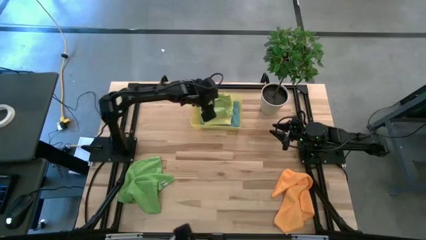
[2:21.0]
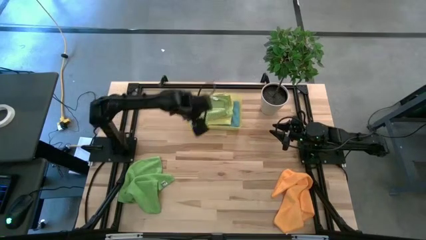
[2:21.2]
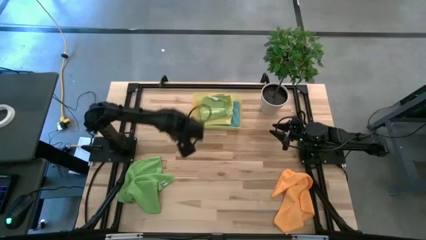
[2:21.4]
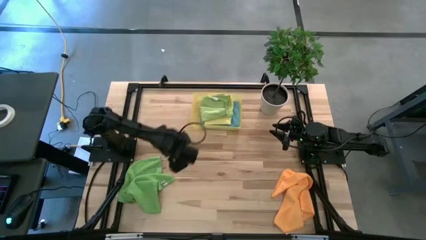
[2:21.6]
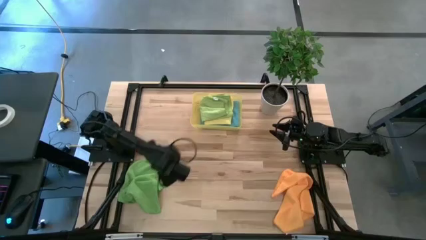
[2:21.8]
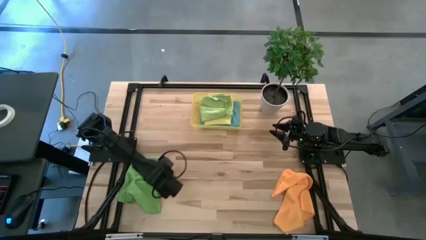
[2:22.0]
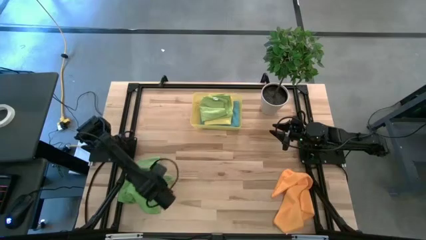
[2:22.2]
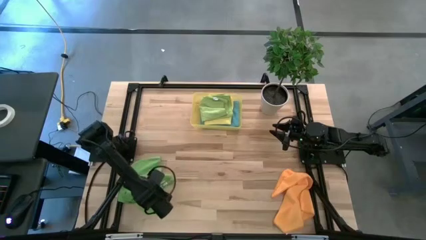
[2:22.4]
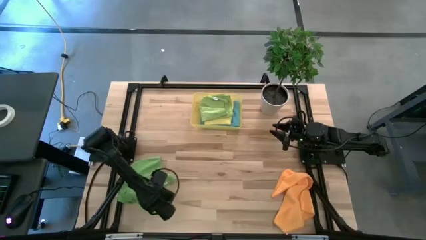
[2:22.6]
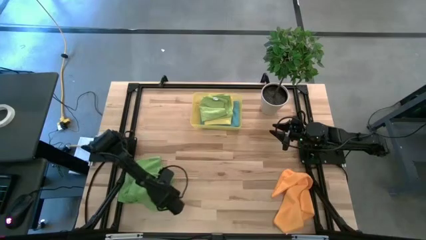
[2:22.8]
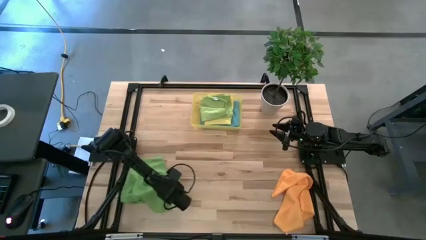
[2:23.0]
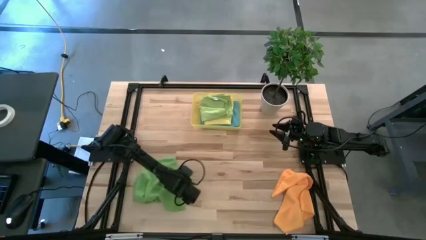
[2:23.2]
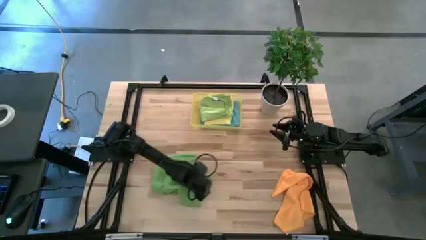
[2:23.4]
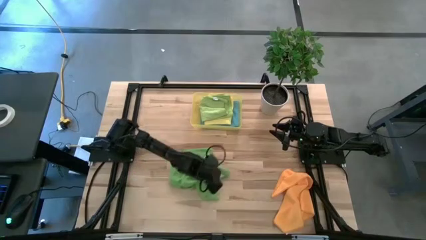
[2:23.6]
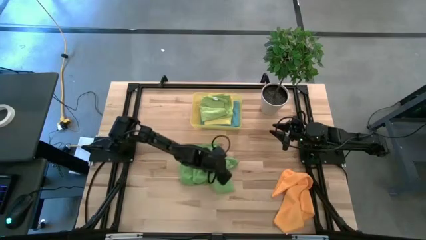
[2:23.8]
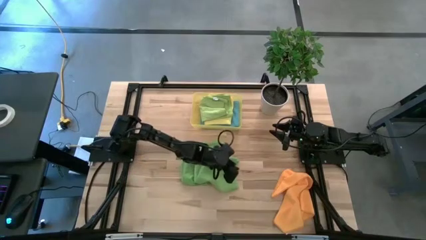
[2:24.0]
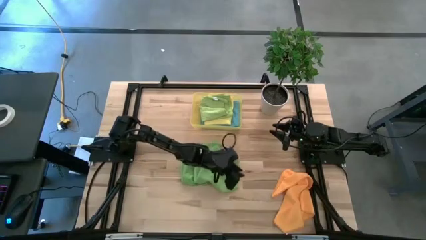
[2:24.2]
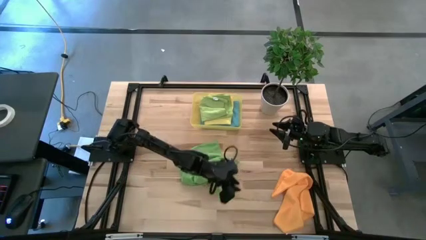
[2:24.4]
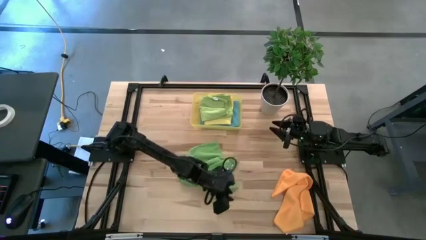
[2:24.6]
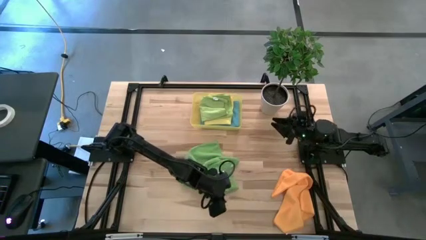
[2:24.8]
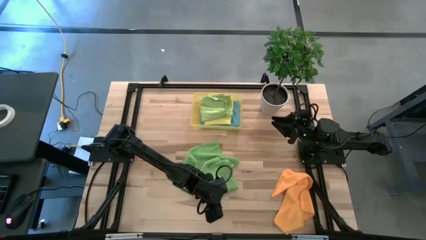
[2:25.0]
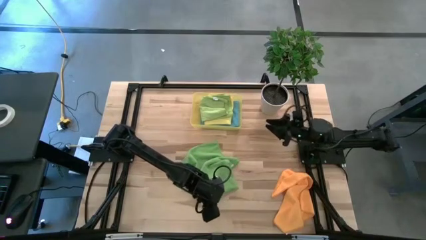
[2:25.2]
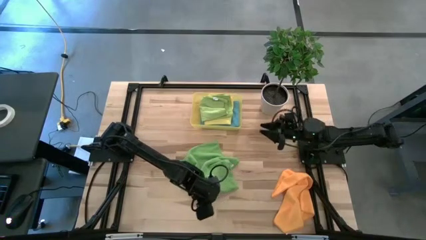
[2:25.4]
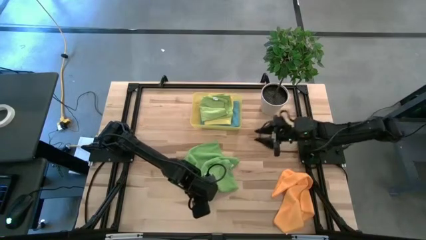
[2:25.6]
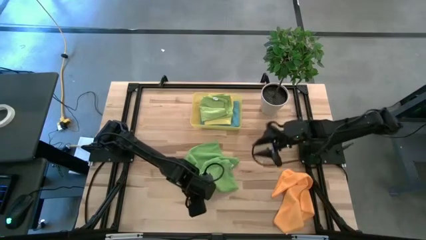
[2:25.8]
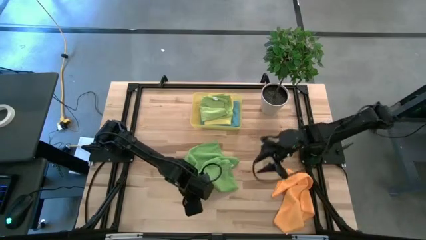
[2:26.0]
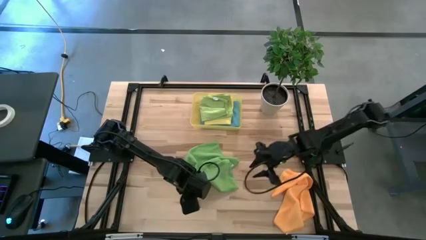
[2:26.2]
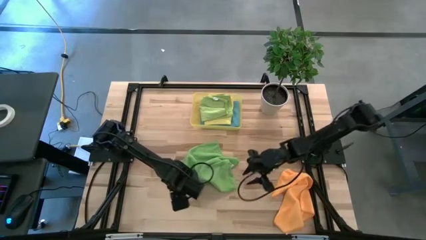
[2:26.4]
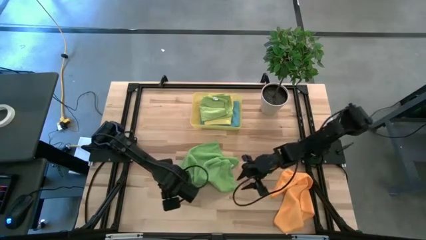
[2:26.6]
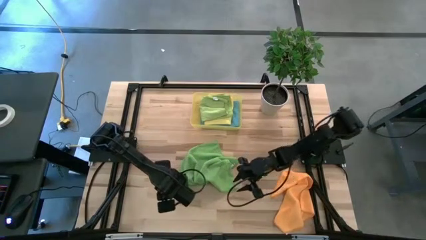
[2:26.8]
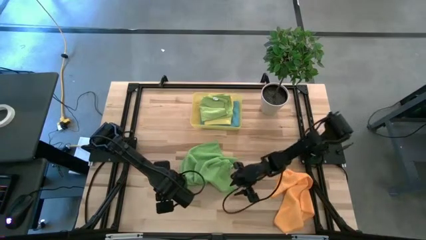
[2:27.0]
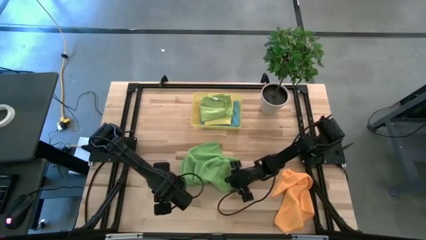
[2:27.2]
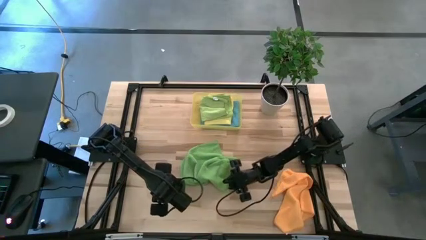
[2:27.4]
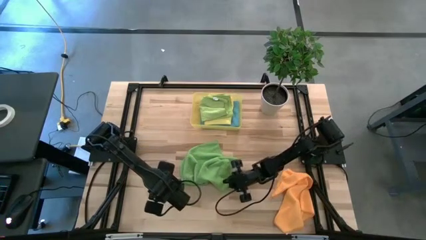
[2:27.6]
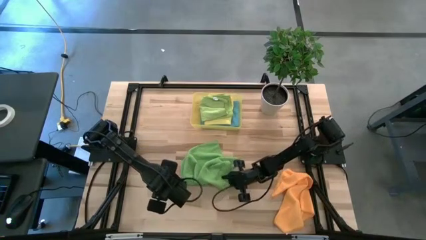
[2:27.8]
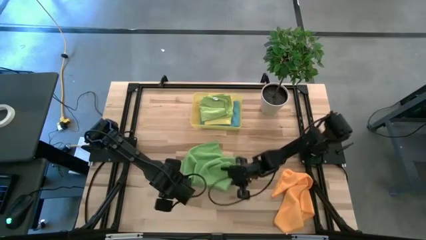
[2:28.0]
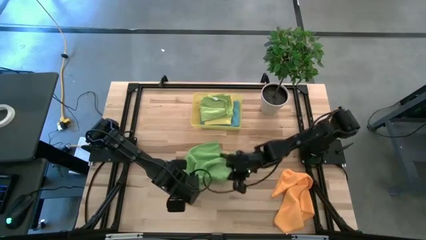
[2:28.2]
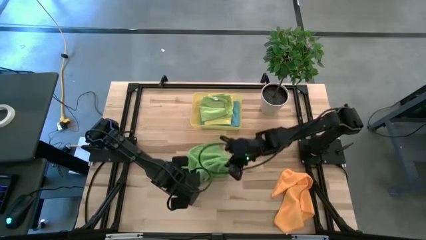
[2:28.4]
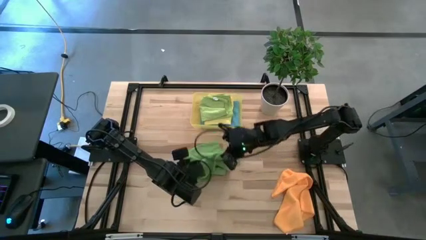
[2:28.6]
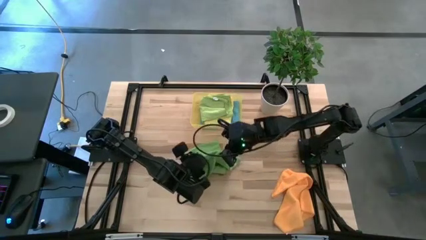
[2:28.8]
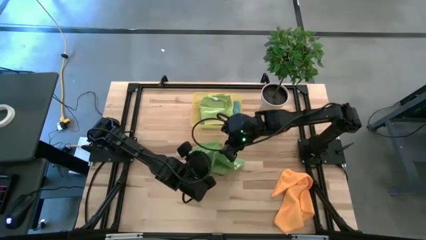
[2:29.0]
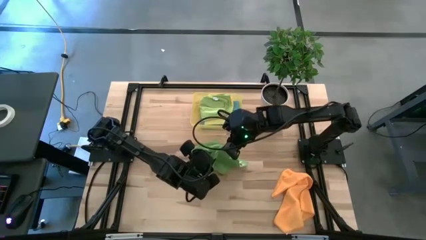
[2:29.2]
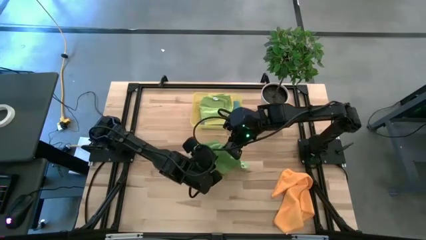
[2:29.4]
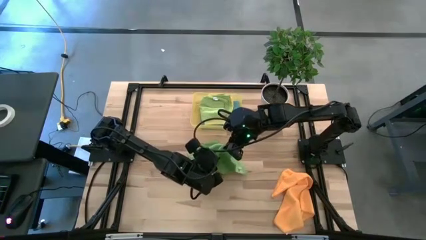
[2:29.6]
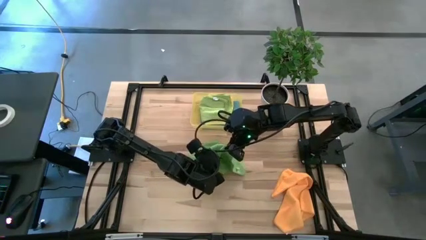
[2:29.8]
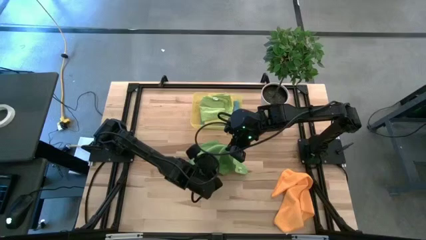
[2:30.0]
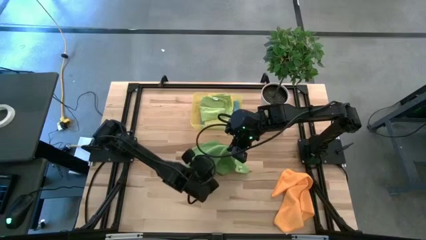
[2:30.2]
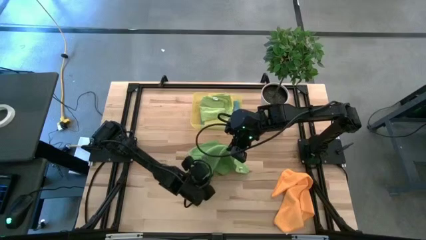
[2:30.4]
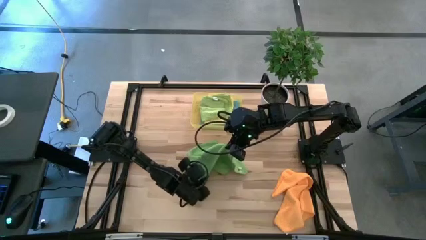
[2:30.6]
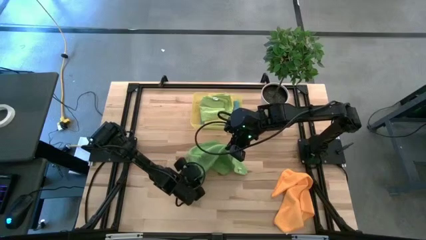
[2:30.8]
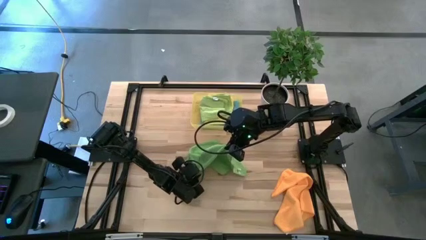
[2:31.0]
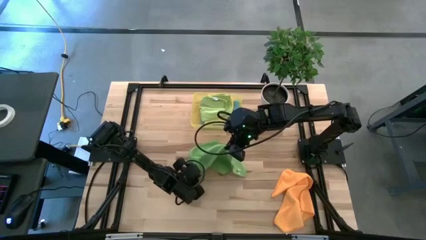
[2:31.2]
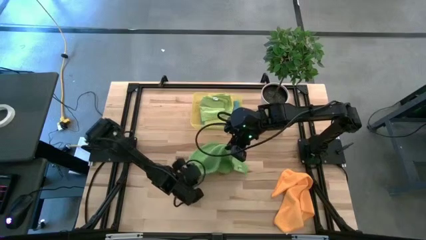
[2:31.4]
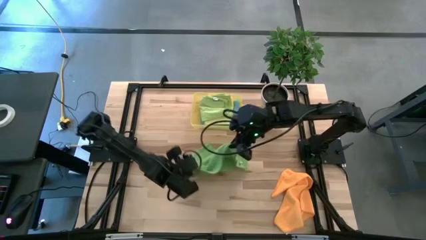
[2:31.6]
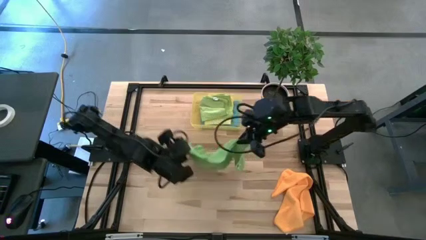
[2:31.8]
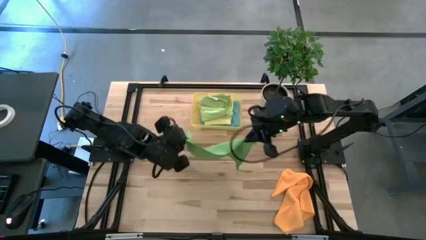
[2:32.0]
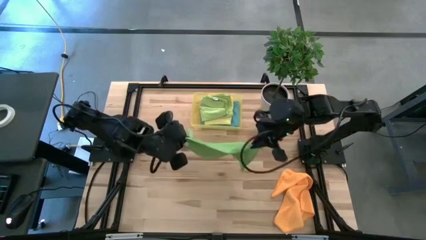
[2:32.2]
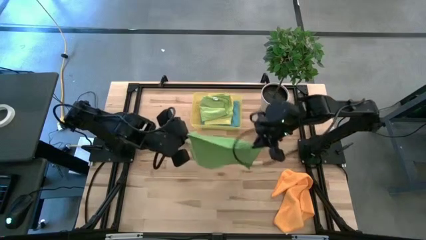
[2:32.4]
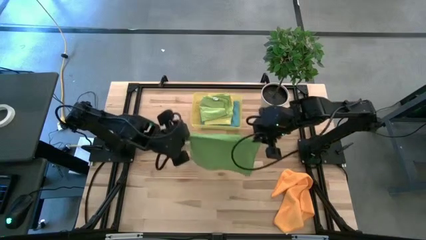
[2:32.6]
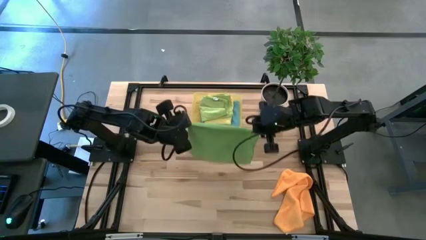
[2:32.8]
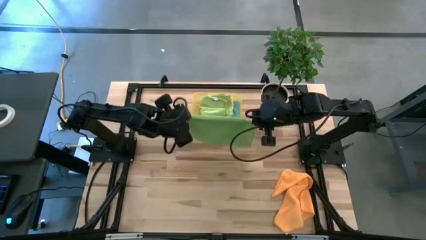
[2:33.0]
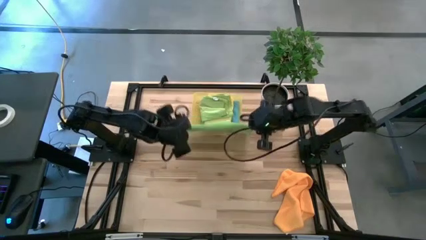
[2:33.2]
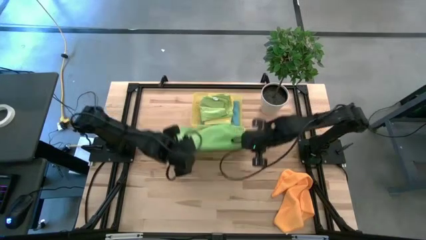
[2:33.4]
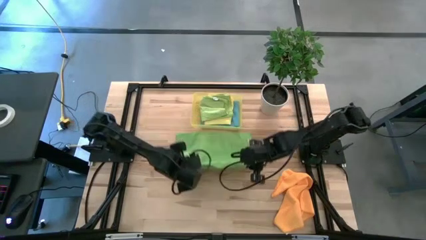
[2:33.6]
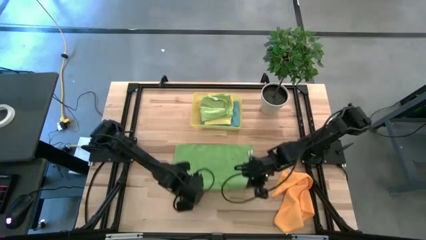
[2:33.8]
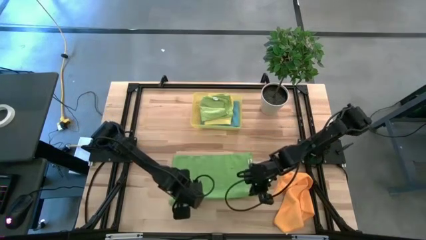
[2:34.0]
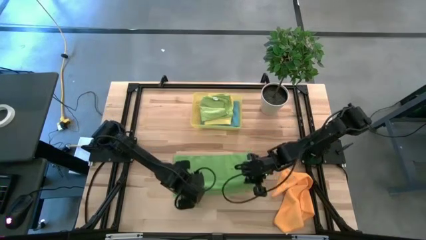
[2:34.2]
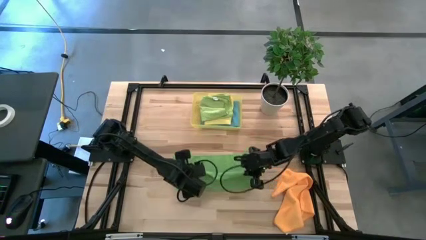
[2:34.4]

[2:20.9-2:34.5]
Task: Fold microfiber towels
Fold the green microfiber cloth
